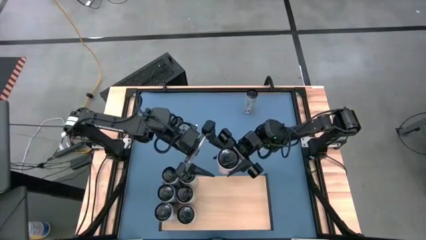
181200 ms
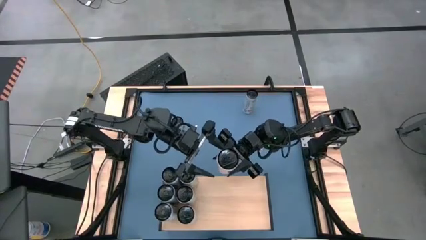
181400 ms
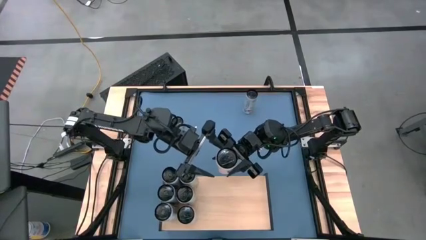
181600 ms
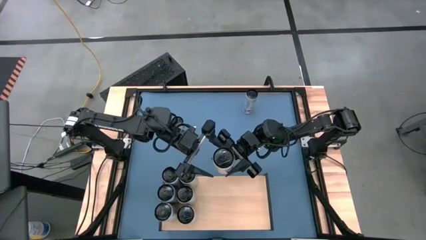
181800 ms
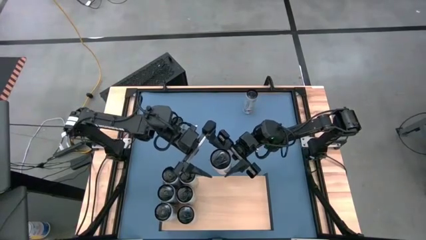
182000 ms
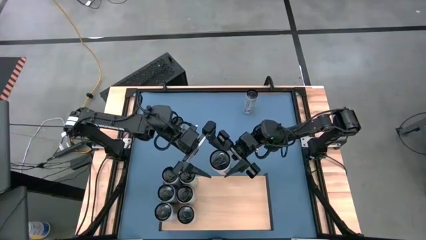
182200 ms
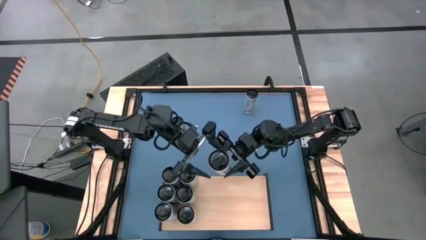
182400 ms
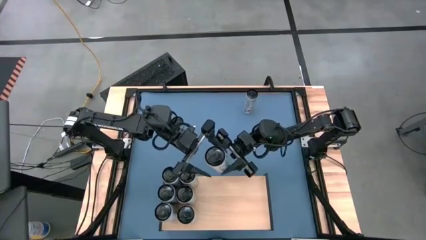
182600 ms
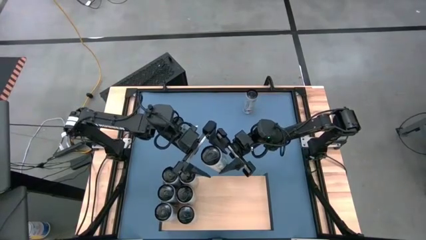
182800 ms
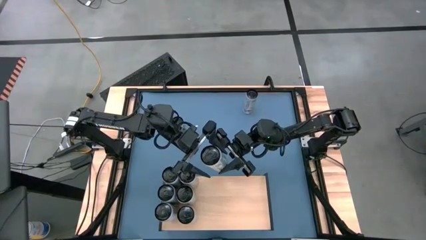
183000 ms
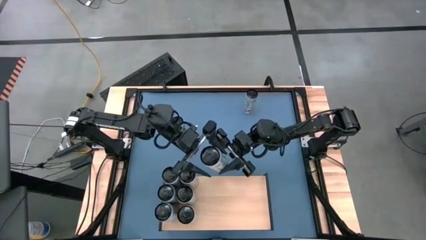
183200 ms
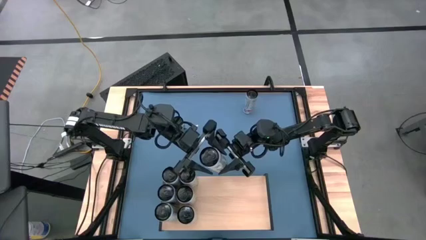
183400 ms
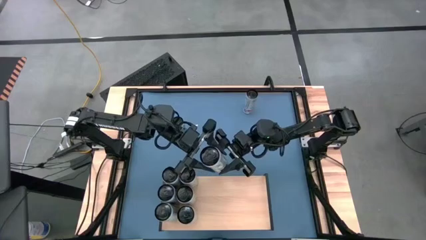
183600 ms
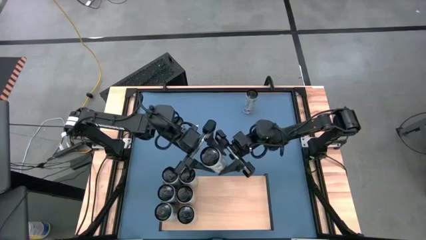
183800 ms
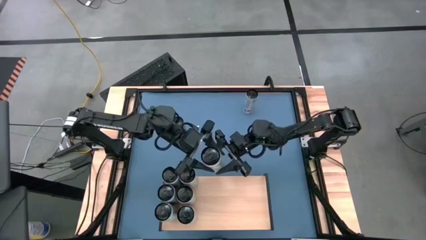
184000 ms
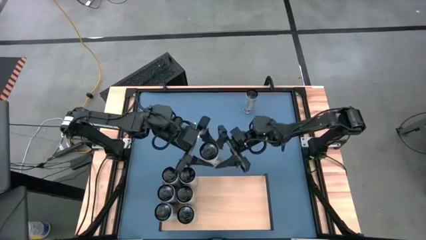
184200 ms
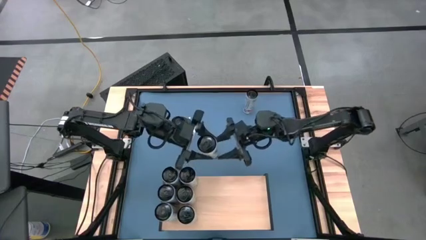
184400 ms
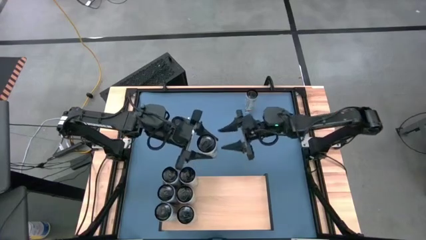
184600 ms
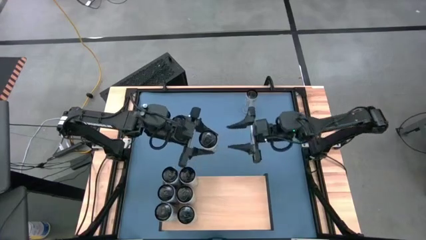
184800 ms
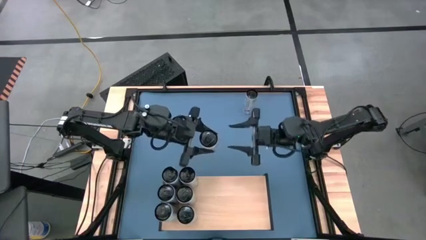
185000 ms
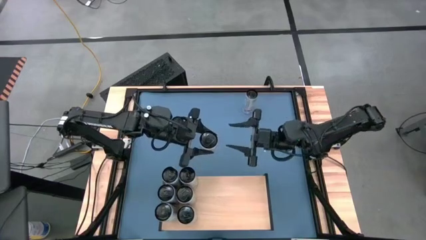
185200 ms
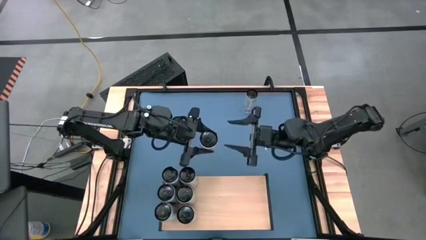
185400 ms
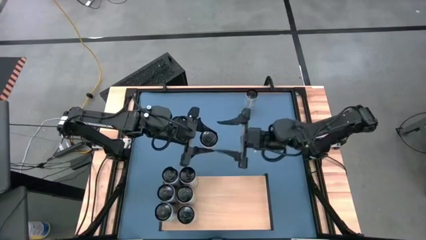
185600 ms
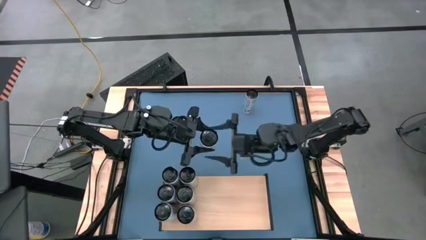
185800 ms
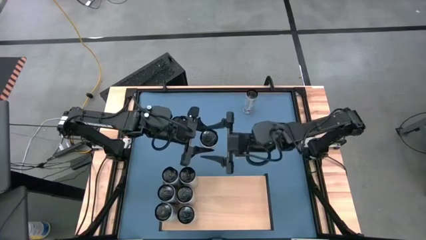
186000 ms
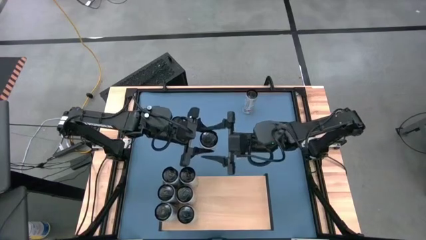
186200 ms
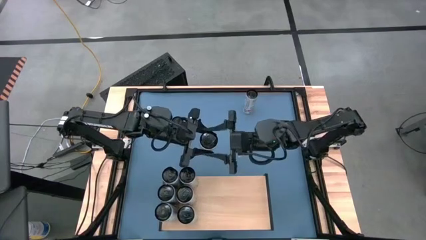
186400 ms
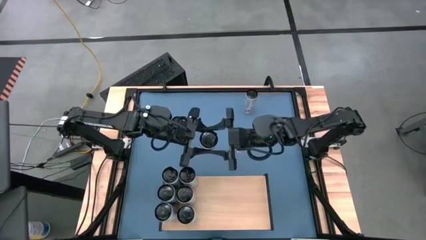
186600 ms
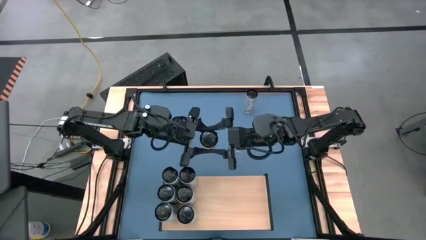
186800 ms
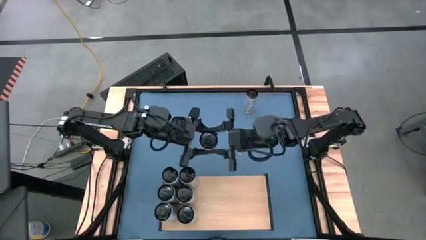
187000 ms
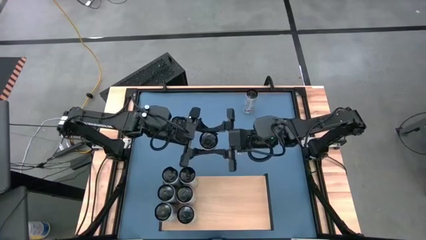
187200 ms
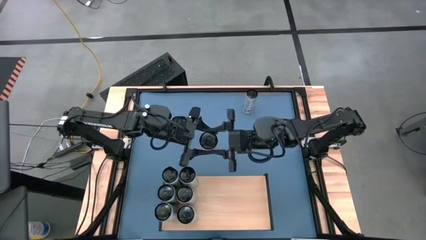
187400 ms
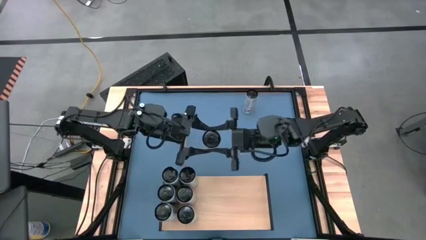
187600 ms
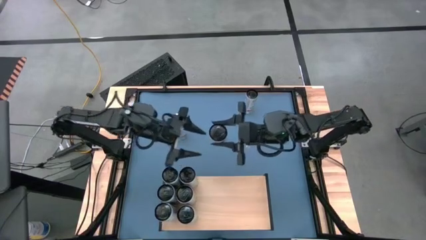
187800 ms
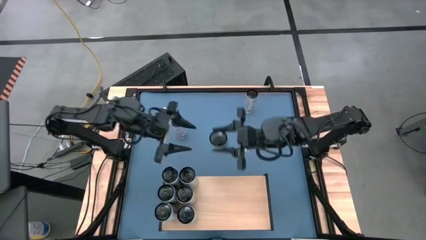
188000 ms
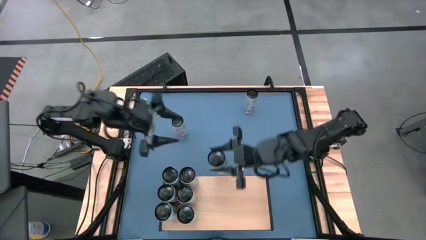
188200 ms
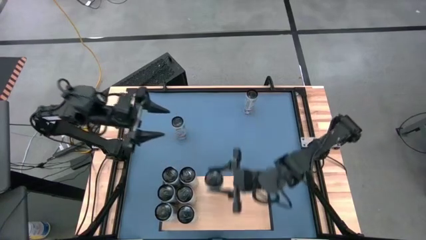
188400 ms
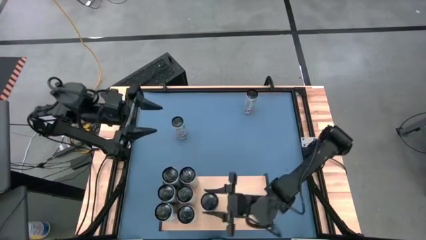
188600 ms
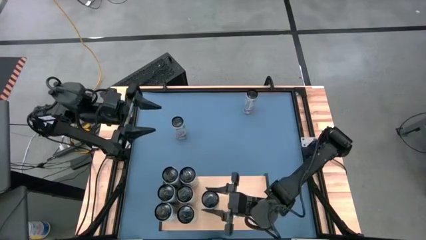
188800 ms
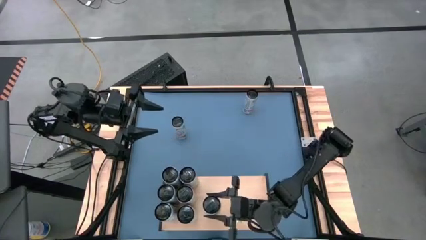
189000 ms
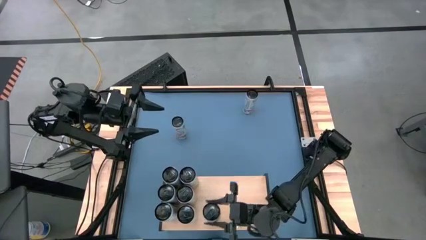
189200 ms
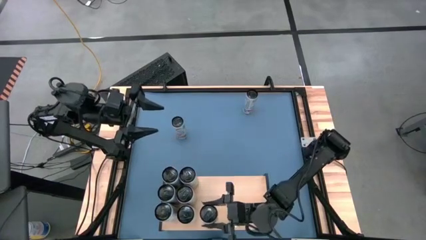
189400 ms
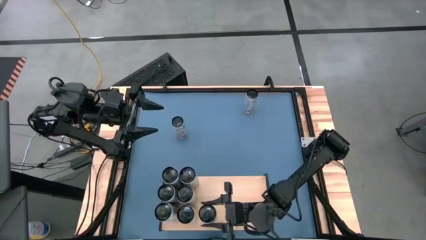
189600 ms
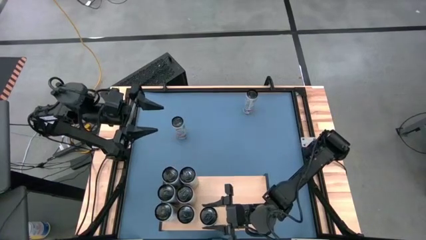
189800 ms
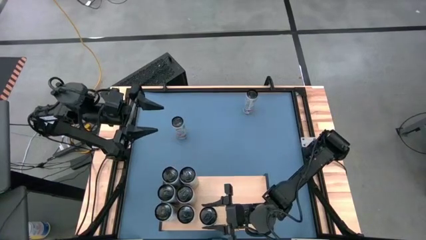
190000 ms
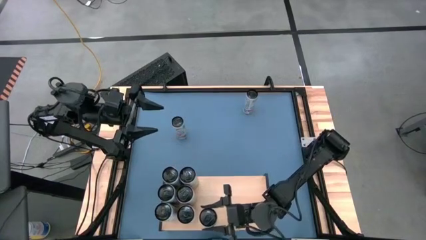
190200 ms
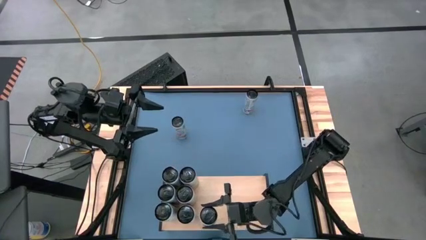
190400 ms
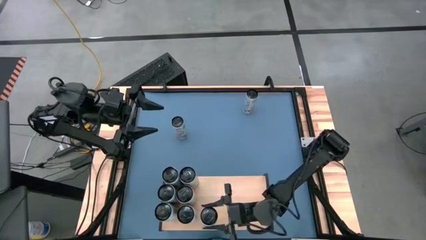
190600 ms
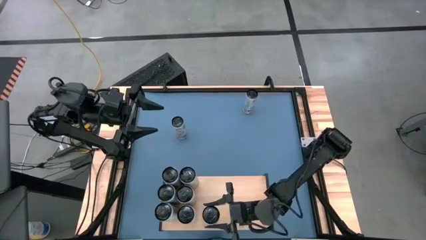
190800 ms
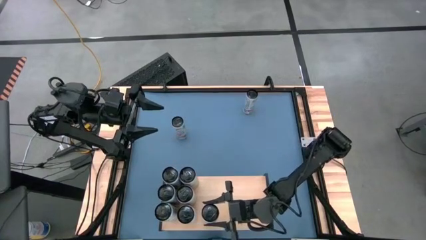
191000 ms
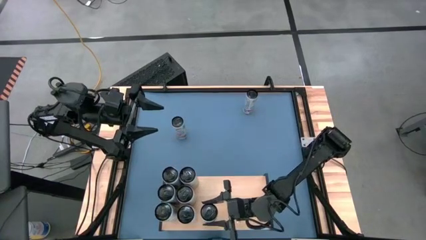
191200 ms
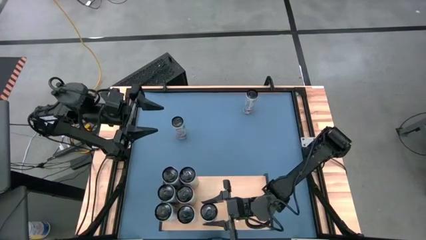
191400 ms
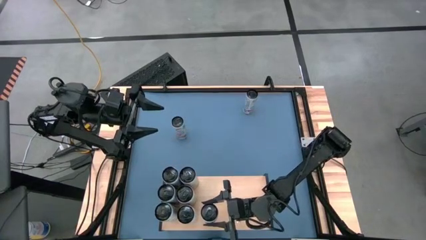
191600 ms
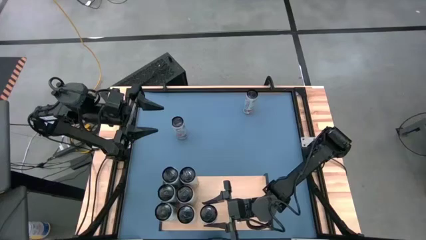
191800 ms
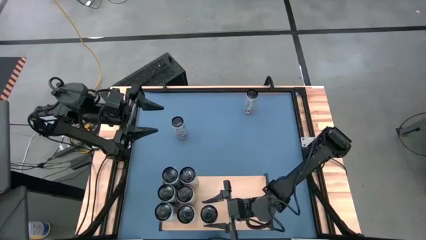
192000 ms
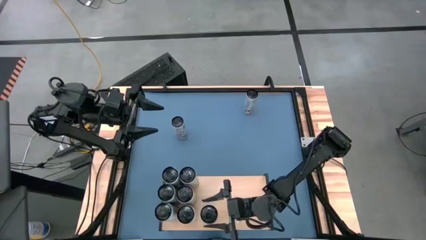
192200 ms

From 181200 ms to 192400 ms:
Task: Place canned beverage on shelf
Put the bottom right white pink soda can on the shelf

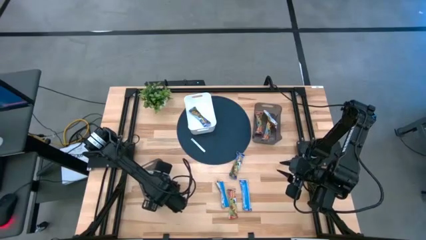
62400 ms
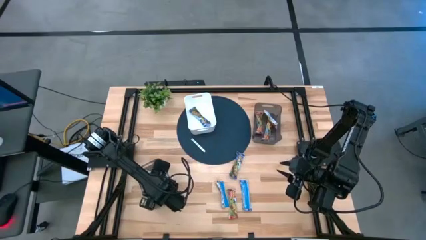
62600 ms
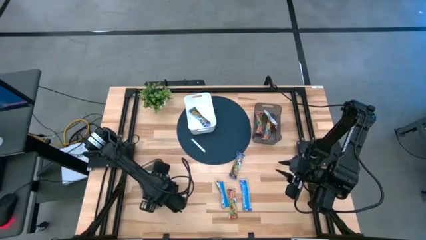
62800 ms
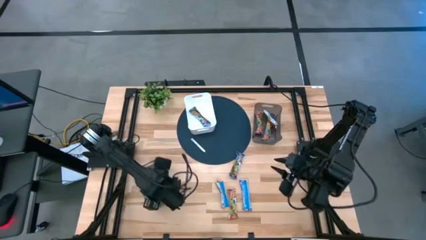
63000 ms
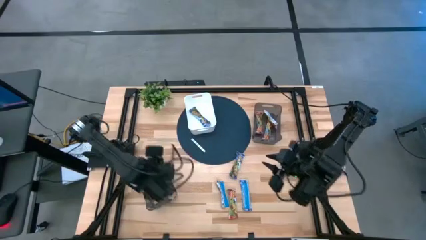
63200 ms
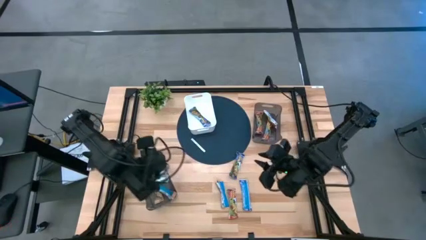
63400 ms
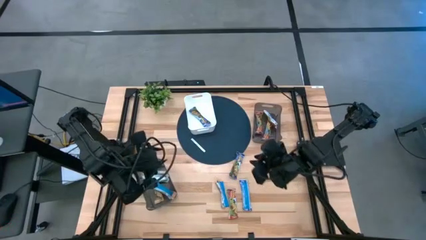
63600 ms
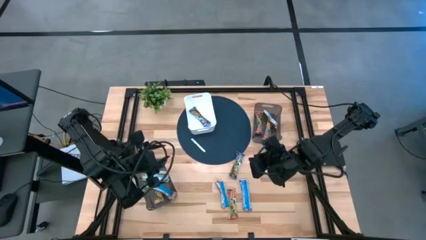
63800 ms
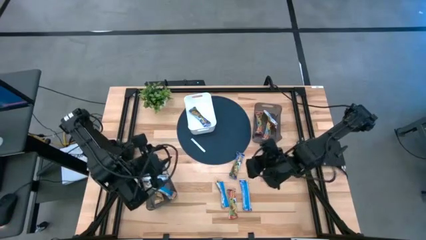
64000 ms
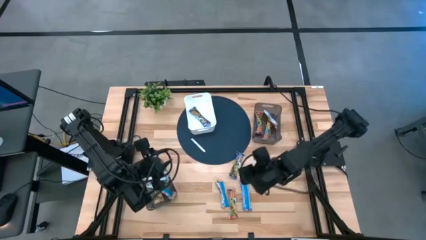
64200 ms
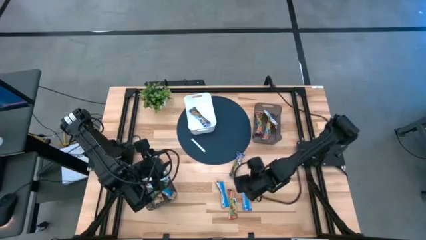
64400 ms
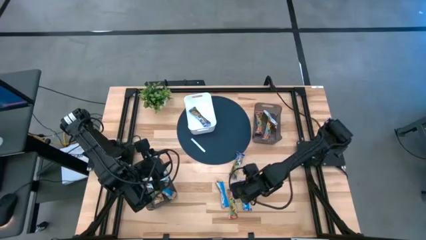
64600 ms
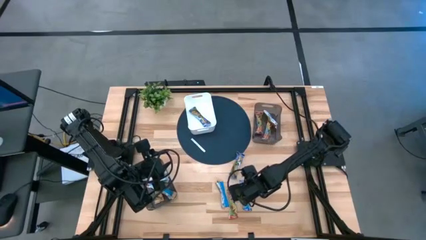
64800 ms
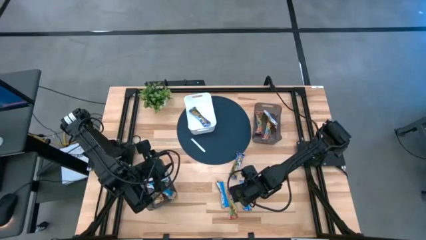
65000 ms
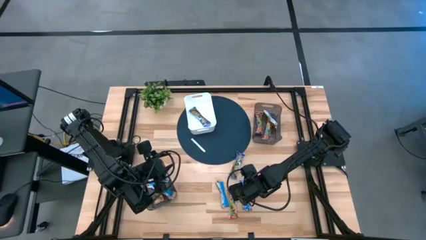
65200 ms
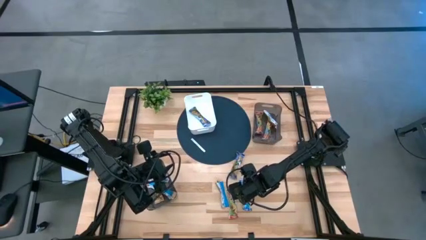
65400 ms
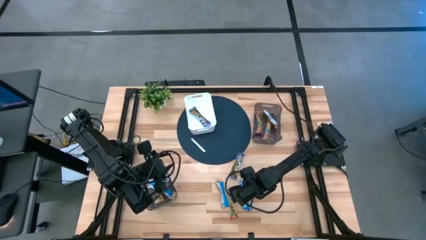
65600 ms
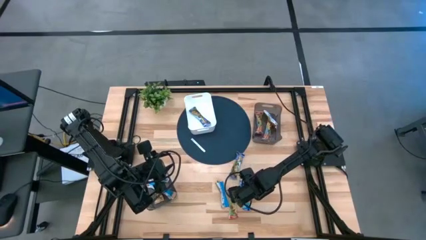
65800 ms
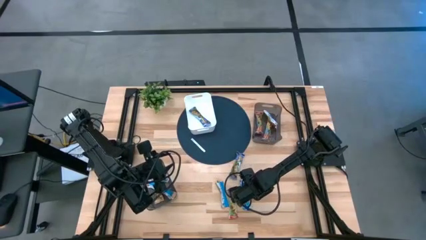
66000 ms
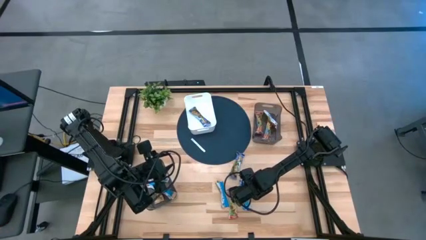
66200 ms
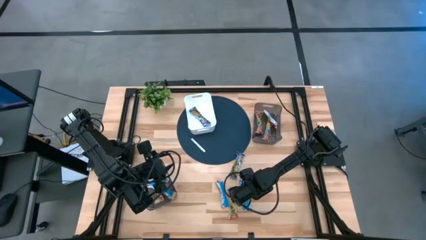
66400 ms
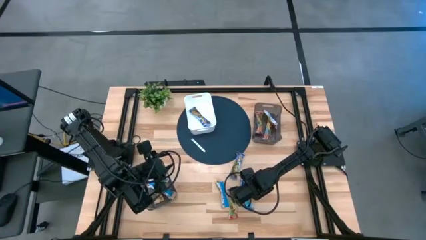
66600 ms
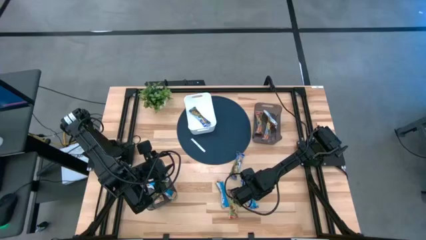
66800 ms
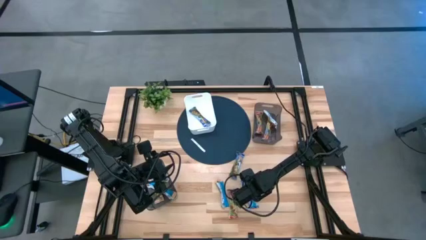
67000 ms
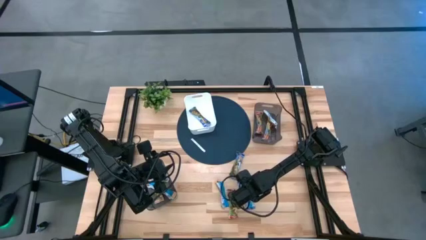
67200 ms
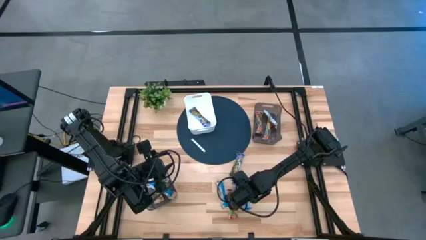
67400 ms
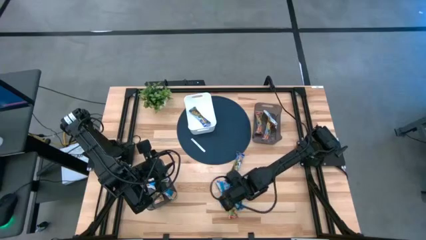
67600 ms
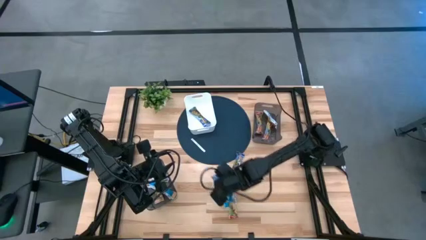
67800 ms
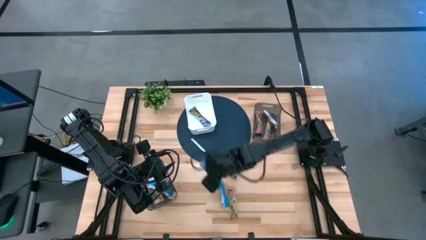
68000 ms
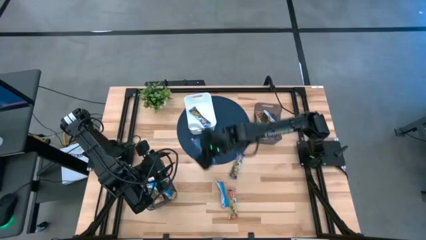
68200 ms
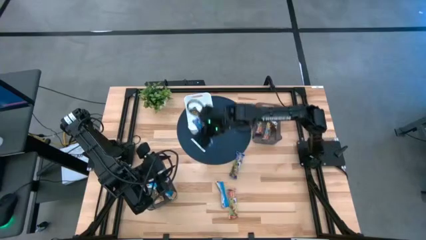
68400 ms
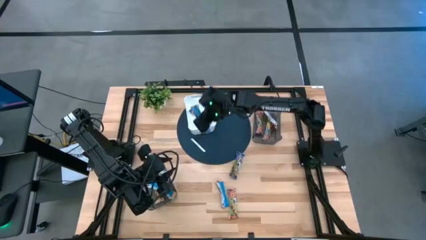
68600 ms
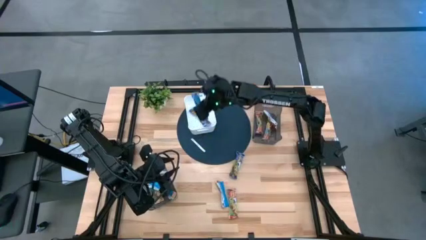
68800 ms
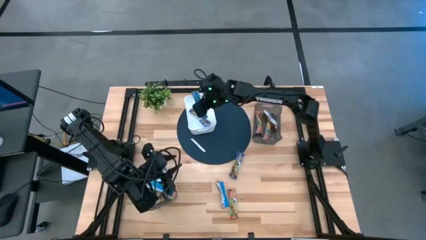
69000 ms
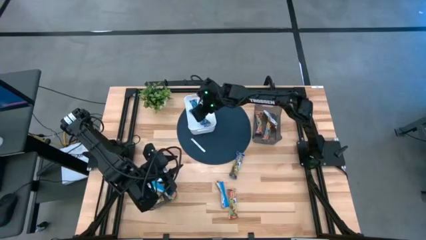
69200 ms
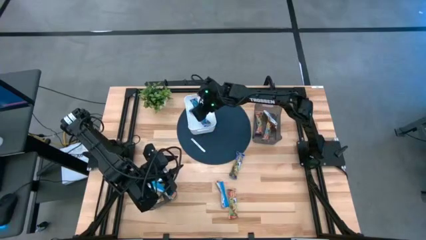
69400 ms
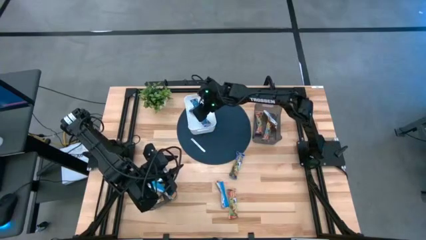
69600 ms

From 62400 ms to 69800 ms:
Task: Pick and place Granola Bars by type
Put the bottom blue granola bar into the white bin
